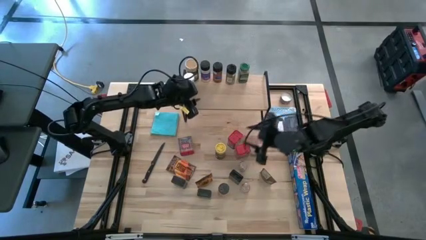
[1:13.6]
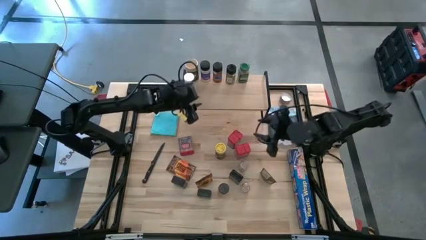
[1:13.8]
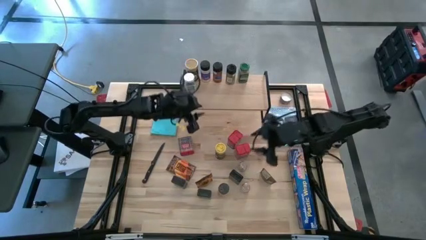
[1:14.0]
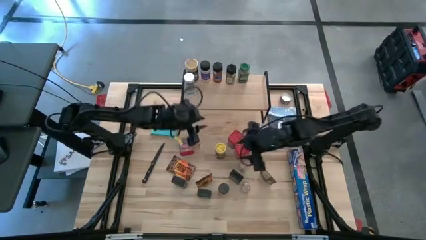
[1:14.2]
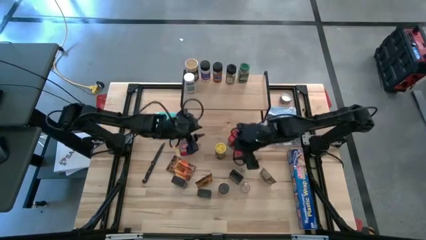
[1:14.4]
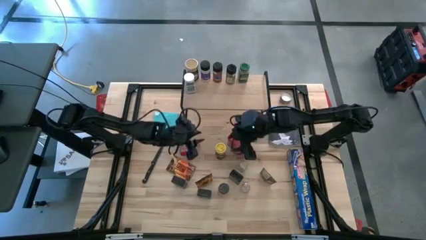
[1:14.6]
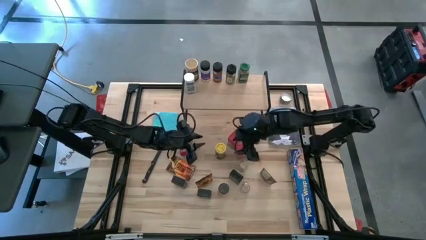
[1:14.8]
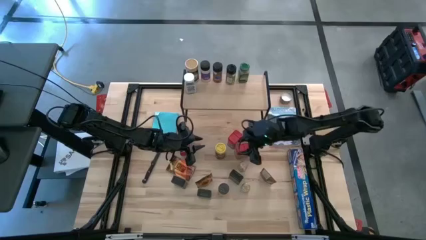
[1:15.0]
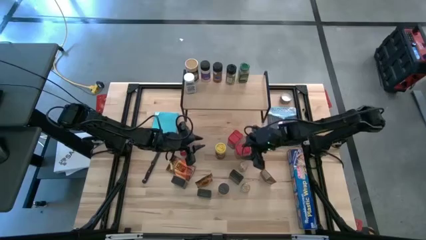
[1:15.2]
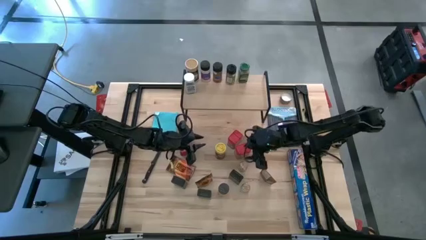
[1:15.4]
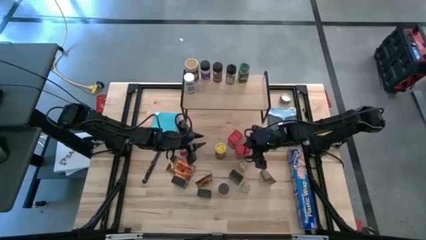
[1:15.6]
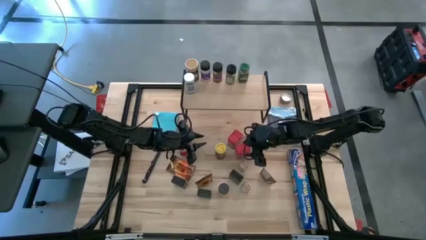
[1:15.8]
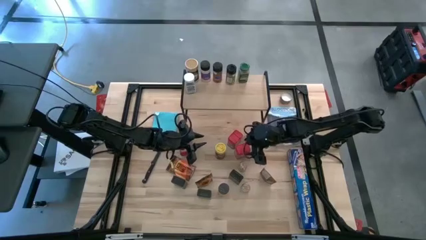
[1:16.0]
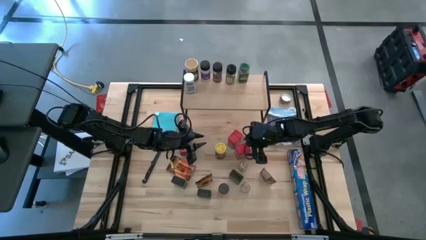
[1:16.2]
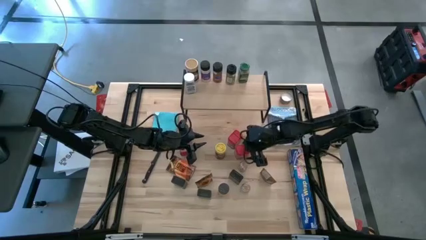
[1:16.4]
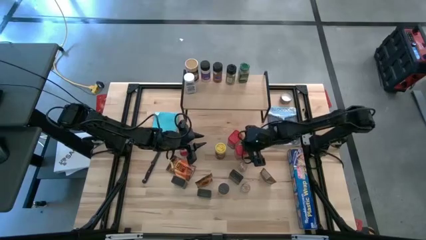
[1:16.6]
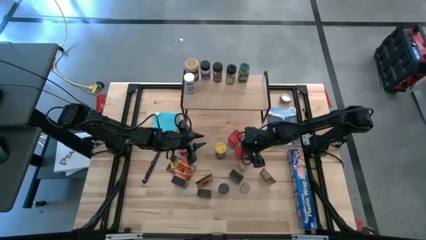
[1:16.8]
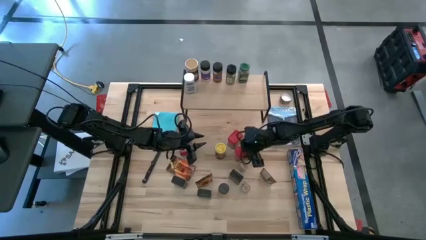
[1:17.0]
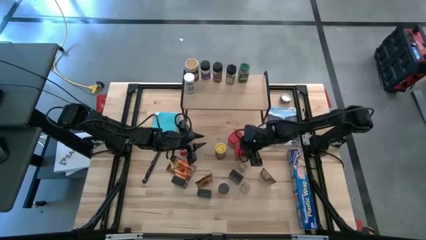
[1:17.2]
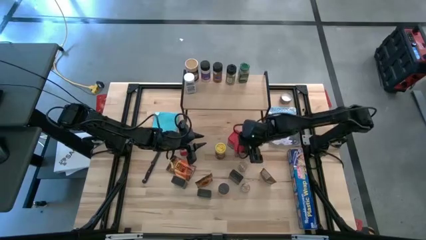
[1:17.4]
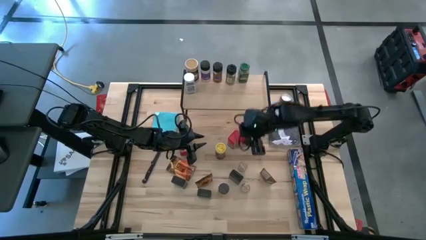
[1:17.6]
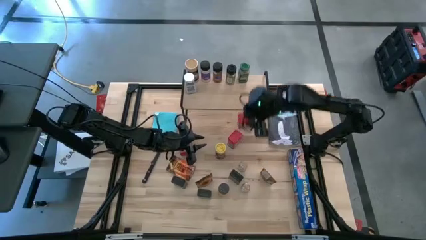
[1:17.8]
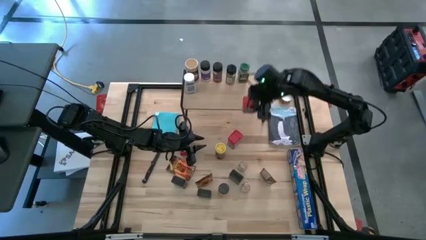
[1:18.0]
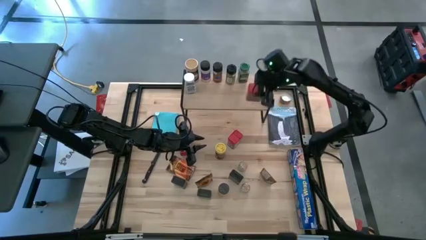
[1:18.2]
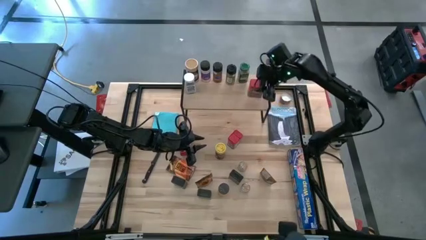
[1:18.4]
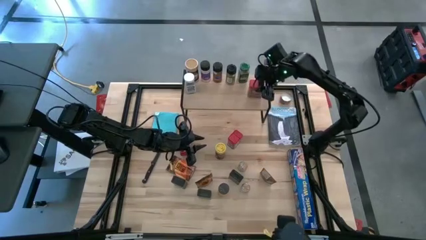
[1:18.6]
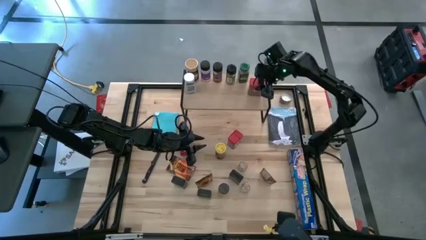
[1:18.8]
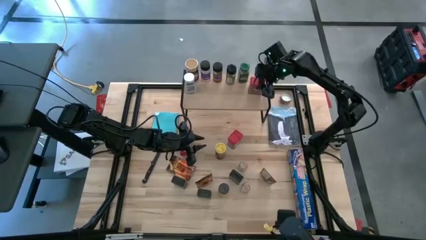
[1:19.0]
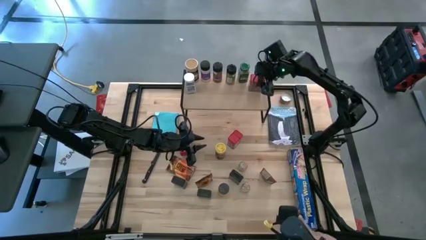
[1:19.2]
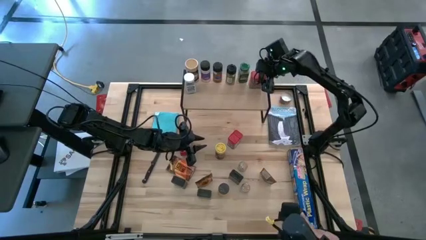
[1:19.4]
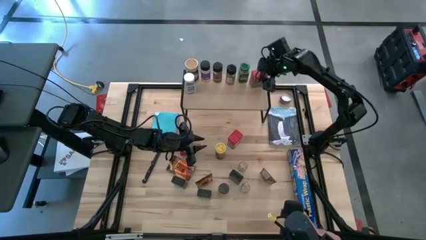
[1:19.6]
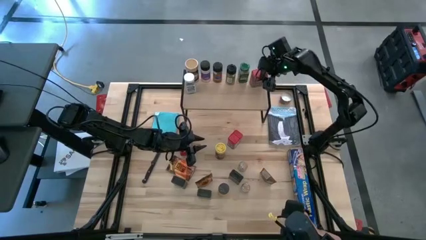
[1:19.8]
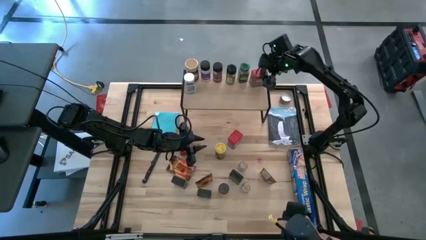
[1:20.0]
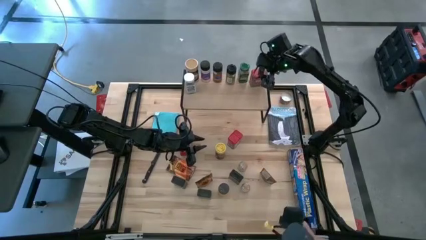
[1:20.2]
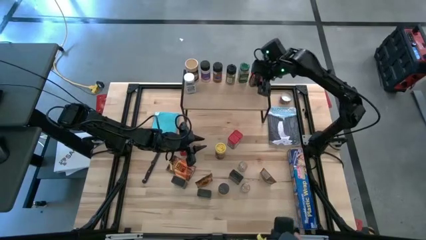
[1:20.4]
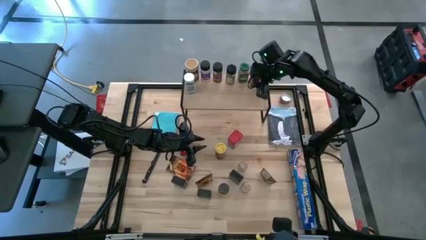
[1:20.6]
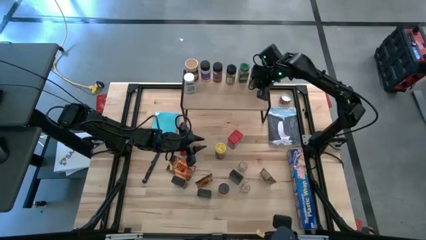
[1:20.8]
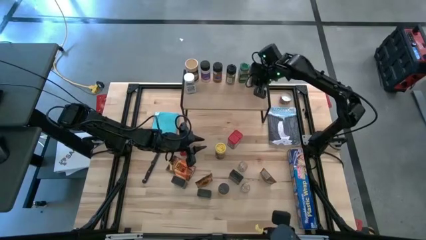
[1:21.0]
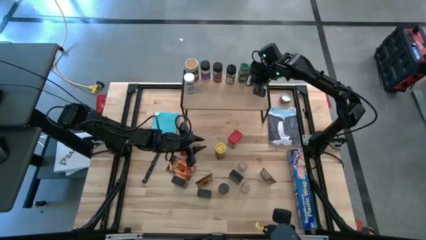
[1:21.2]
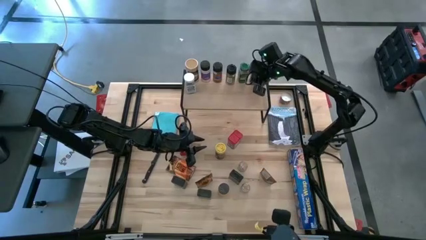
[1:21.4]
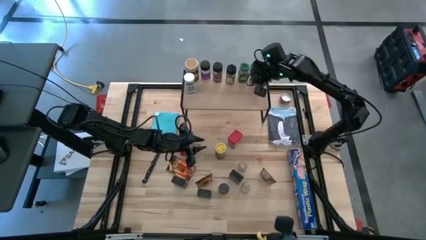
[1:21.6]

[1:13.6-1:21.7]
Task: Shelf spices
Put the red seasoning can on the shelf

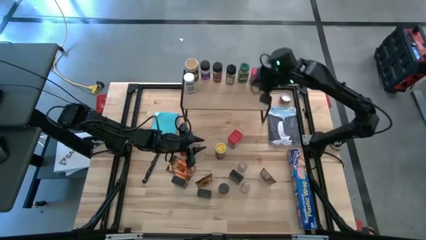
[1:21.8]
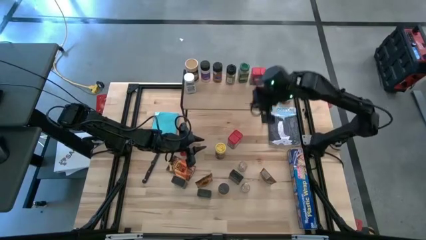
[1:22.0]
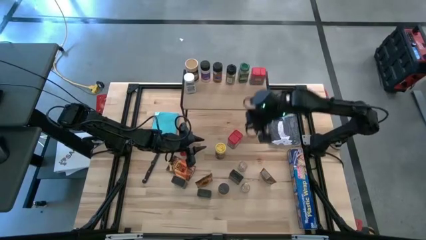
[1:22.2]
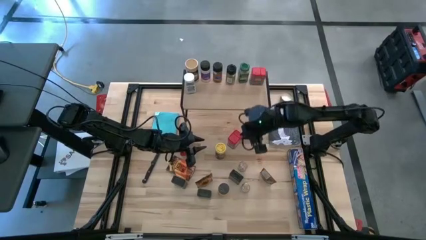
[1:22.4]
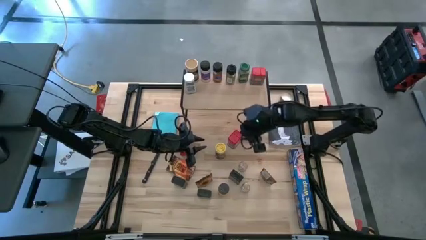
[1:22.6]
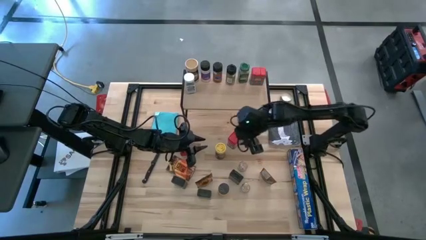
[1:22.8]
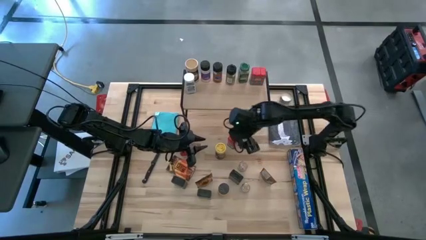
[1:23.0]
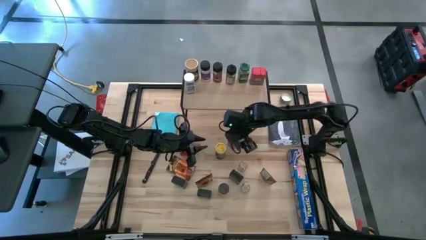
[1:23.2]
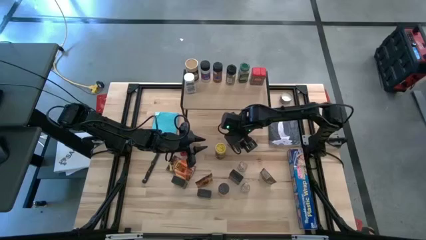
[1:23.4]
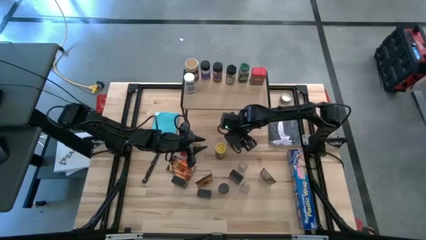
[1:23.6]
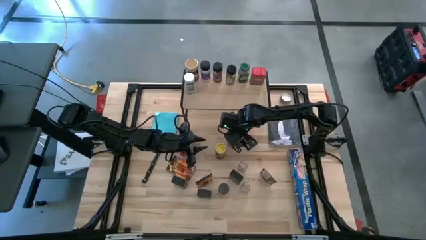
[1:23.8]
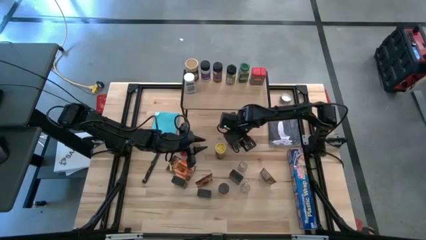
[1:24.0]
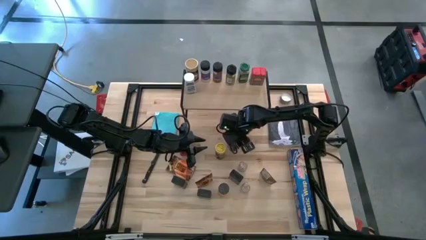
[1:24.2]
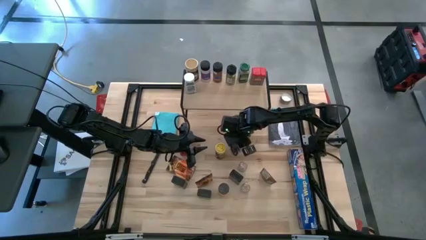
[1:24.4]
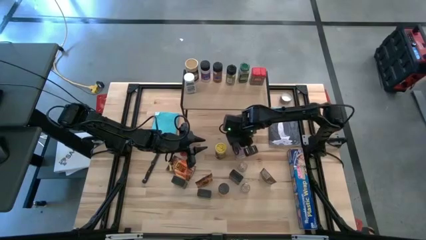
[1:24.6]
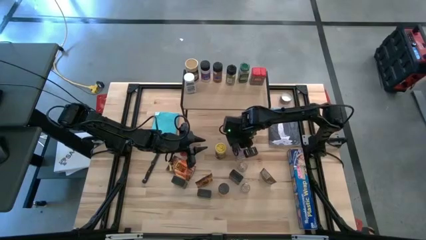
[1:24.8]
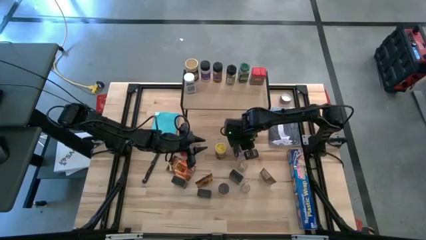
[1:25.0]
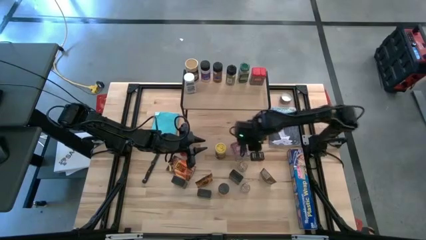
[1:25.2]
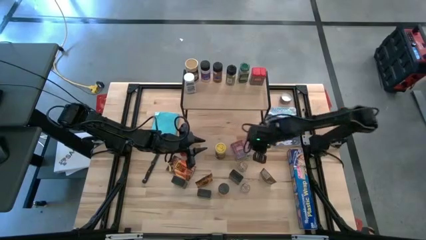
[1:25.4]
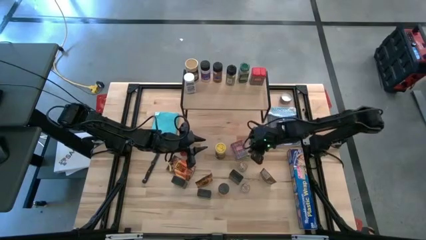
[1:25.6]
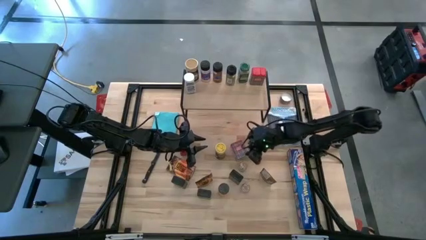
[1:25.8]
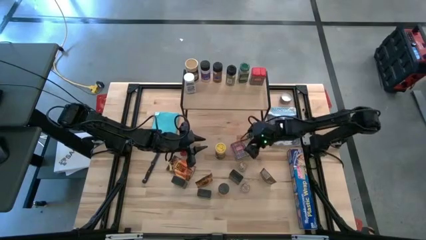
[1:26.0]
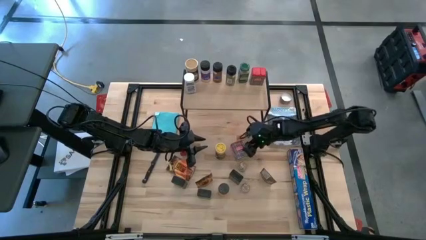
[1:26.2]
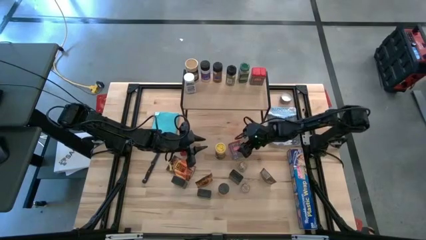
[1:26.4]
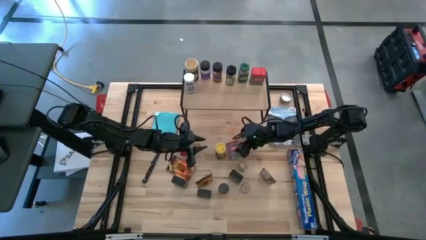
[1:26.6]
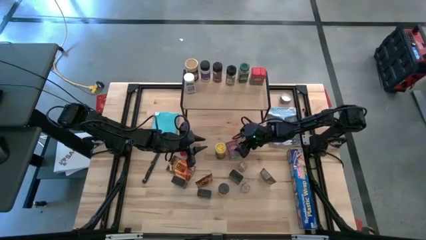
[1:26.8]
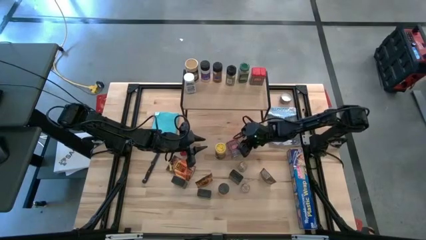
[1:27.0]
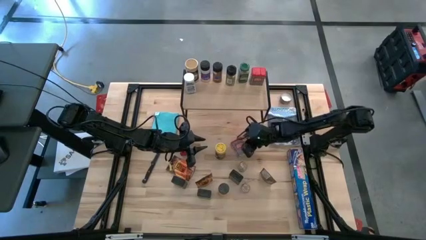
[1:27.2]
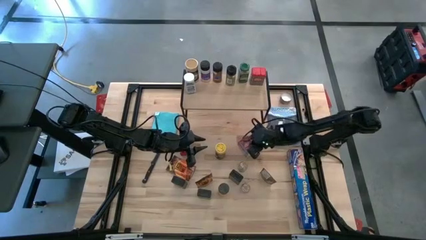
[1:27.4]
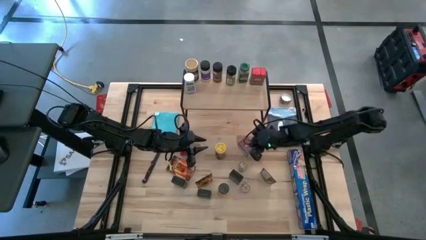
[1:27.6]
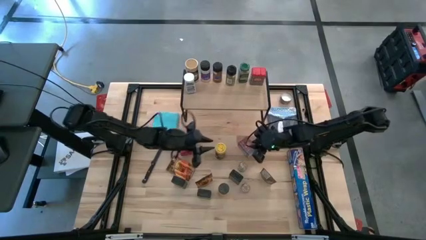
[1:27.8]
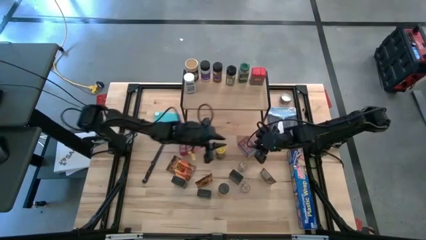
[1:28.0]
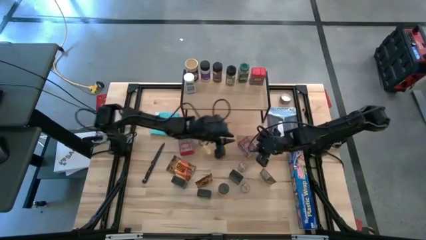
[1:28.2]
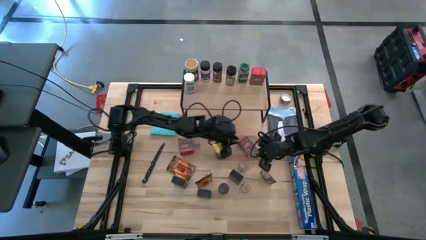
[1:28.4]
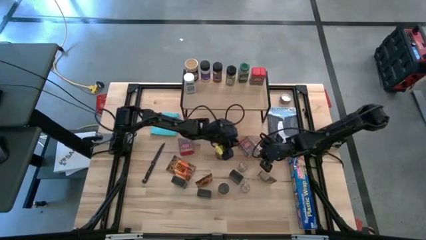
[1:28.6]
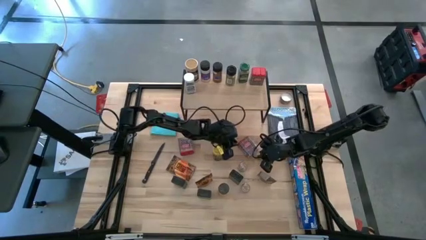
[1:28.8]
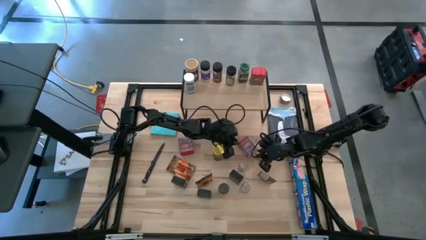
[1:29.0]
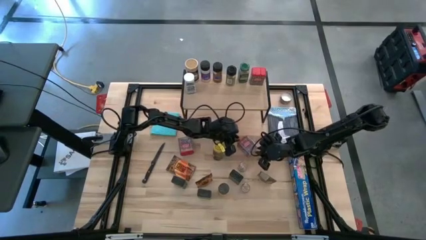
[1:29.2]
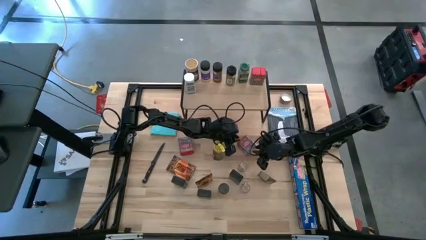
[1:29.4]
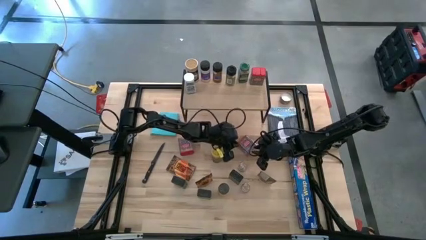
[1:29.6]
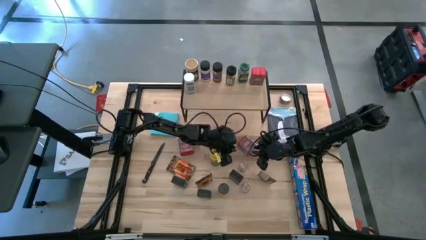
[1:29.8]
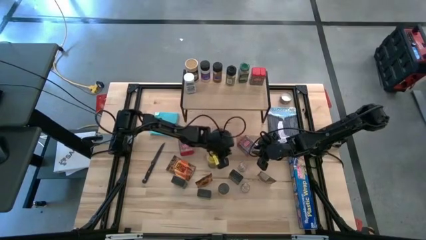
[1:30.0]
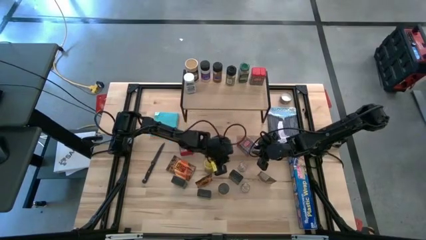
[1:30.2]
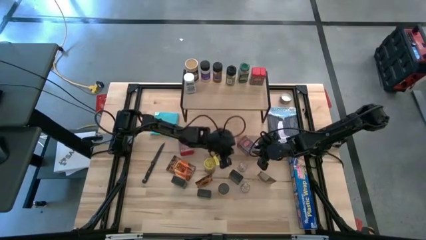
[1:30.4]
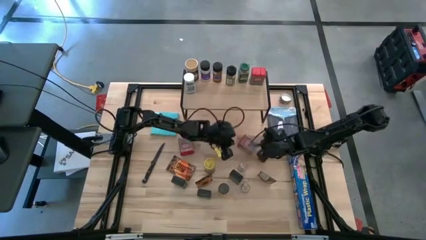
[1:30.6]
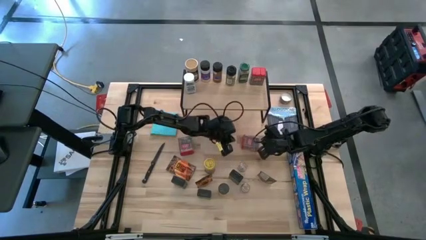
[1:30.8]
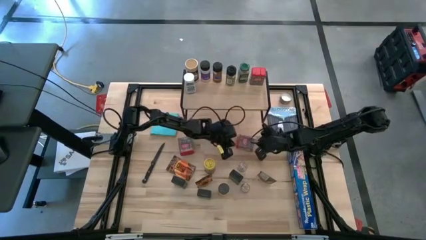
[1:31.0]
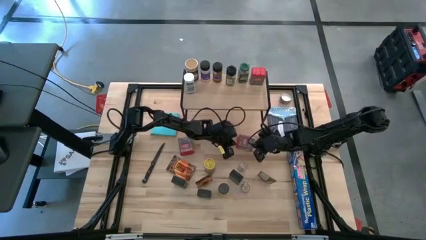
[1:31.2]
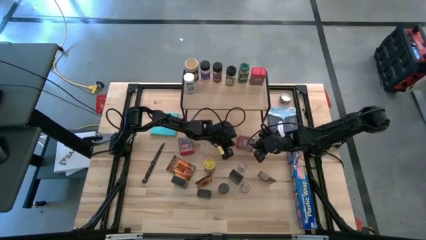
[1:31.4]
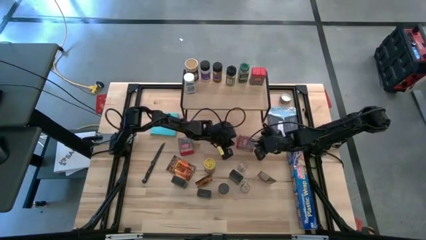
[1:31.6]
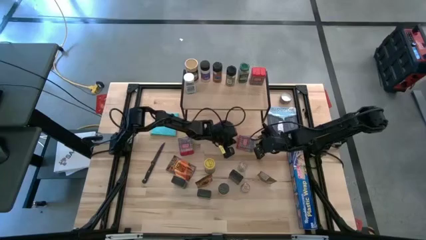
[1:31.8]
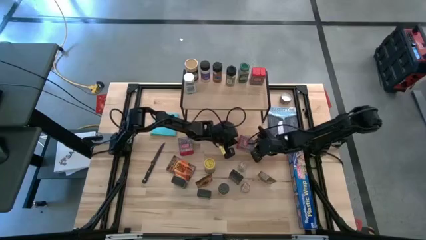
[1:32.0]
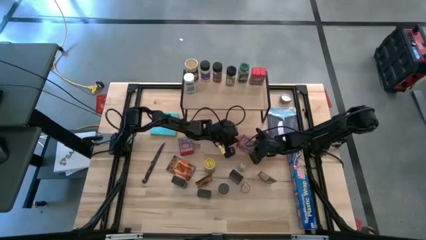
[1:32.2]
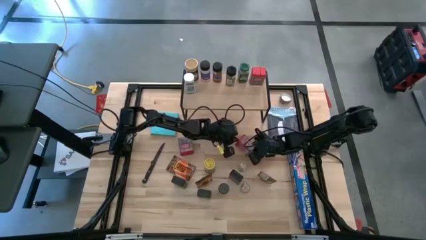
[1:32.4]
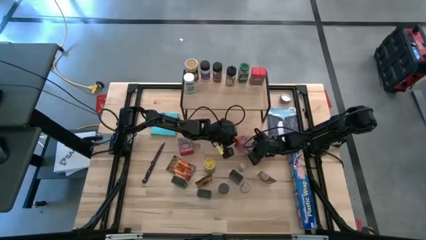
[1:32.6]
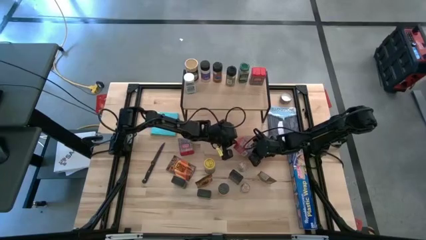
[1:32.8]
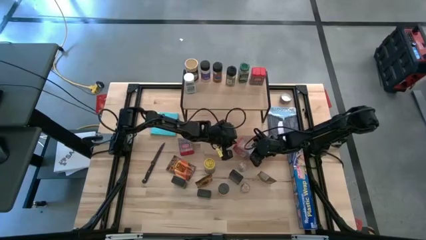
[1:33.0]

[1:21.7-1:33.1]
Put the red seasoning can on the shelf aligned with the other red seasoning can
